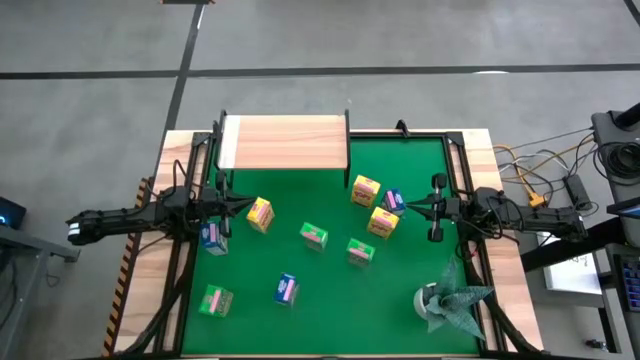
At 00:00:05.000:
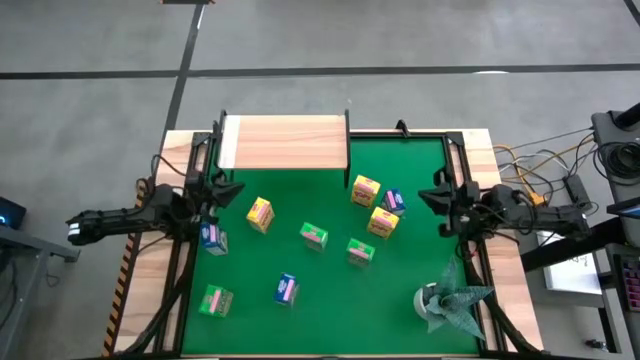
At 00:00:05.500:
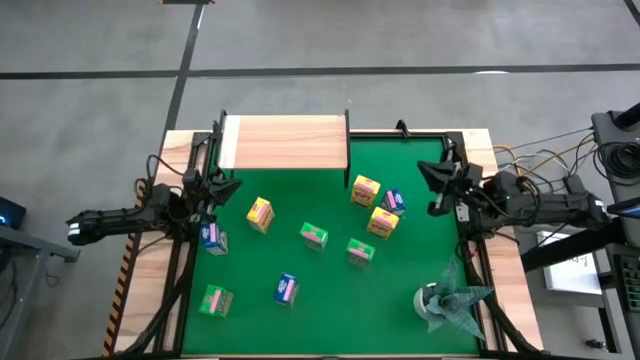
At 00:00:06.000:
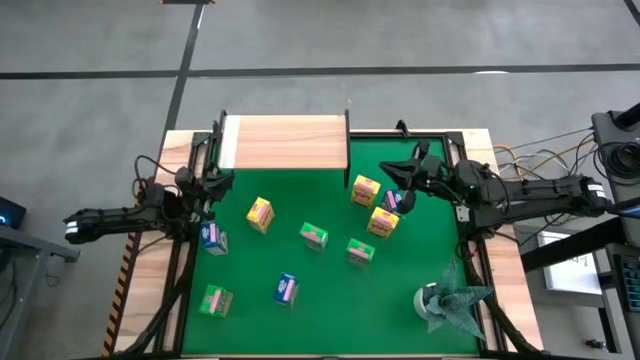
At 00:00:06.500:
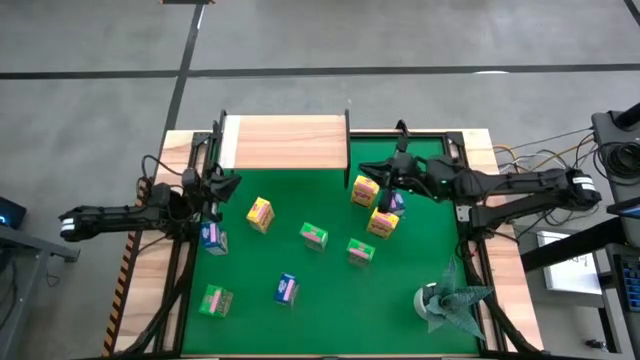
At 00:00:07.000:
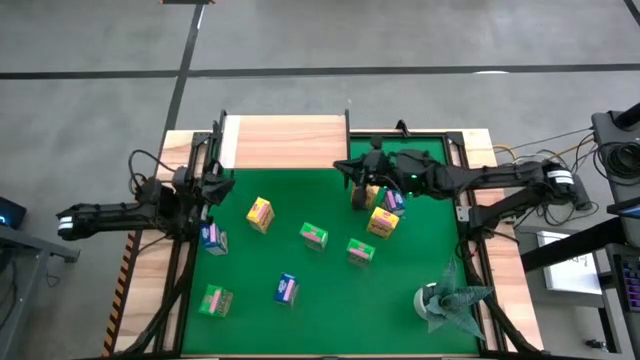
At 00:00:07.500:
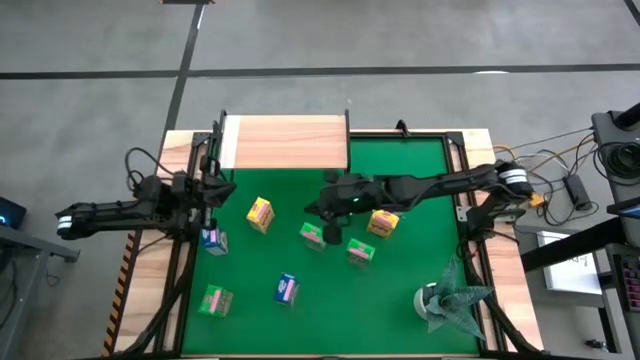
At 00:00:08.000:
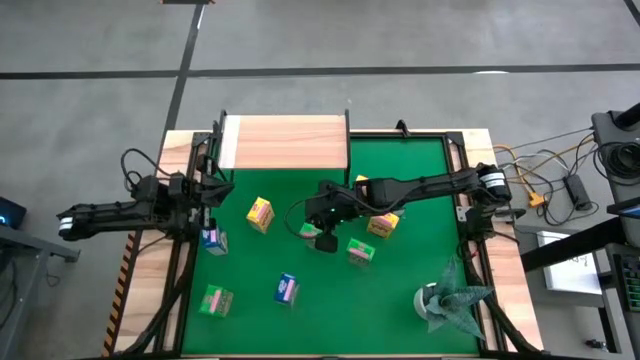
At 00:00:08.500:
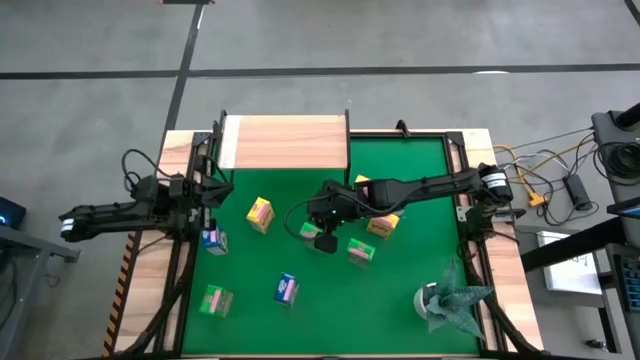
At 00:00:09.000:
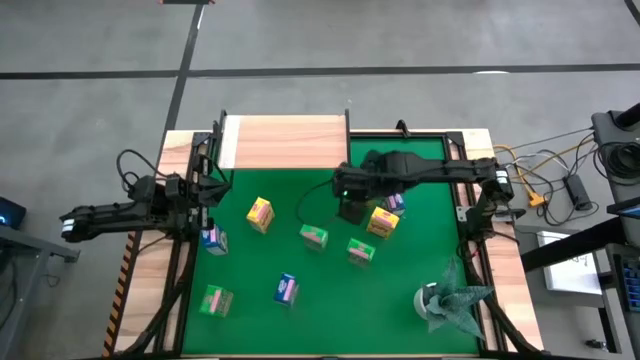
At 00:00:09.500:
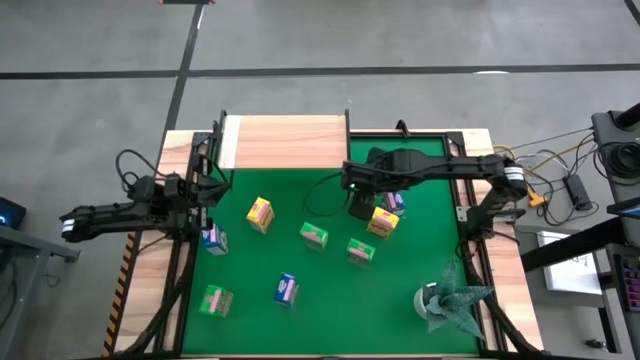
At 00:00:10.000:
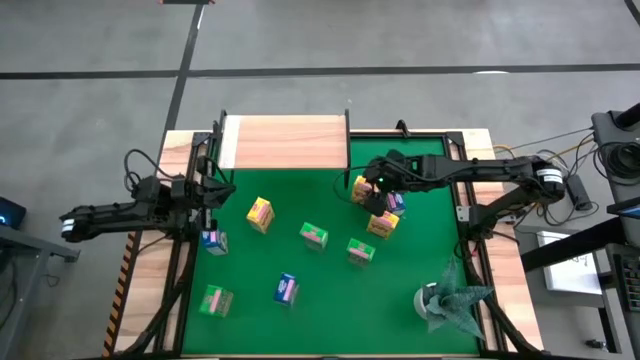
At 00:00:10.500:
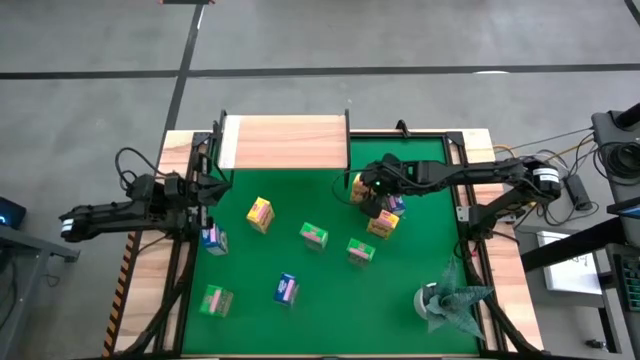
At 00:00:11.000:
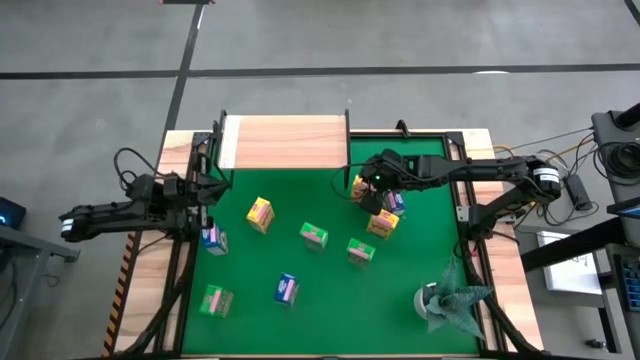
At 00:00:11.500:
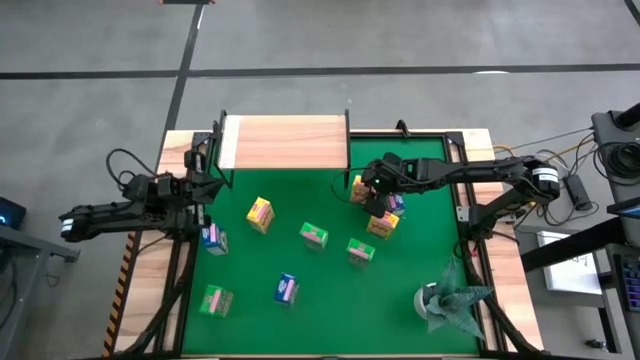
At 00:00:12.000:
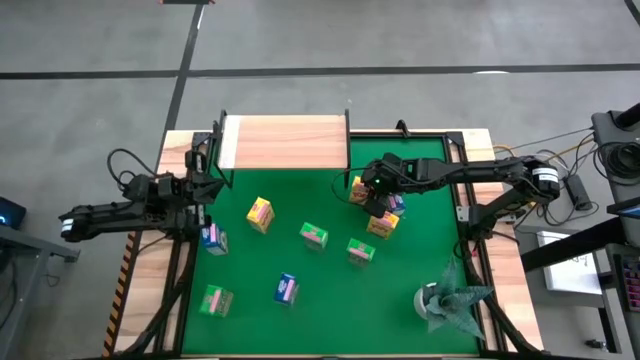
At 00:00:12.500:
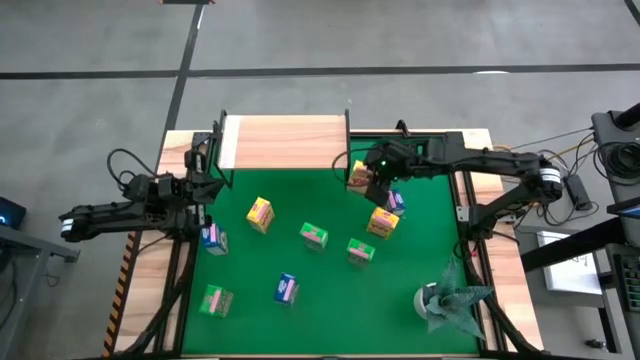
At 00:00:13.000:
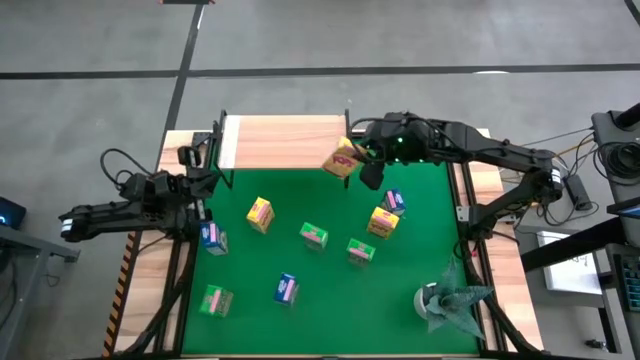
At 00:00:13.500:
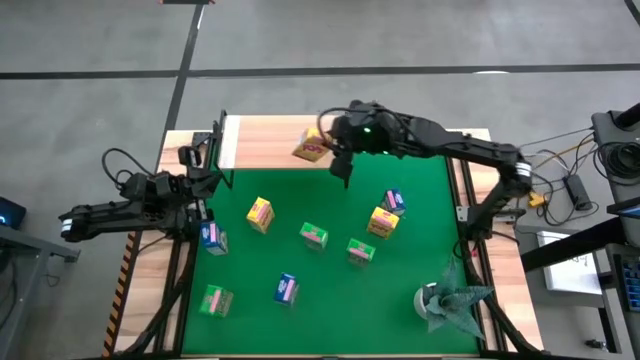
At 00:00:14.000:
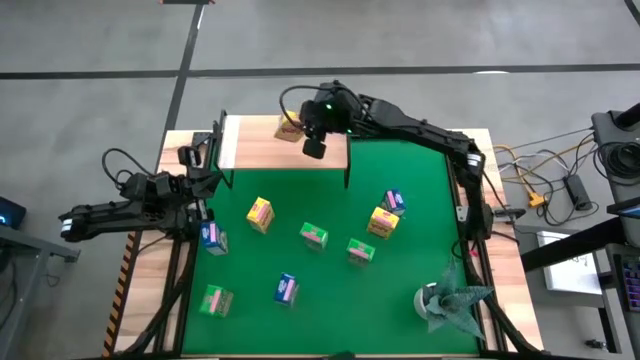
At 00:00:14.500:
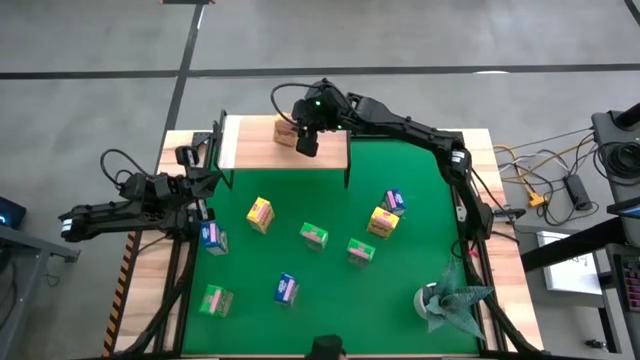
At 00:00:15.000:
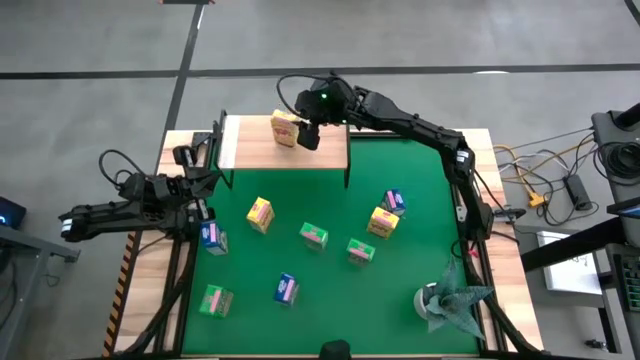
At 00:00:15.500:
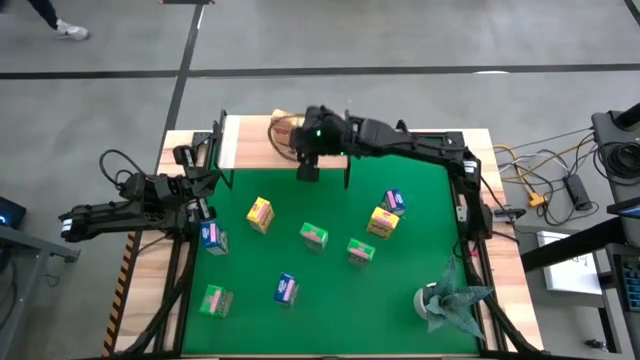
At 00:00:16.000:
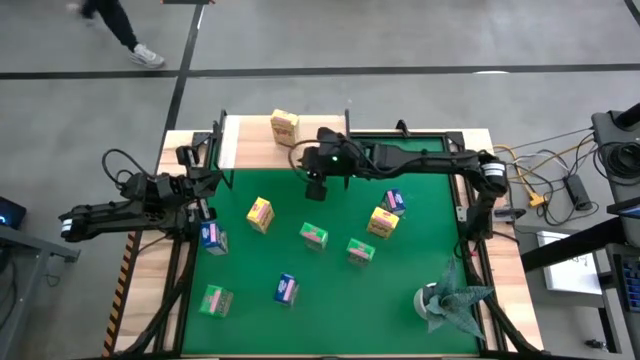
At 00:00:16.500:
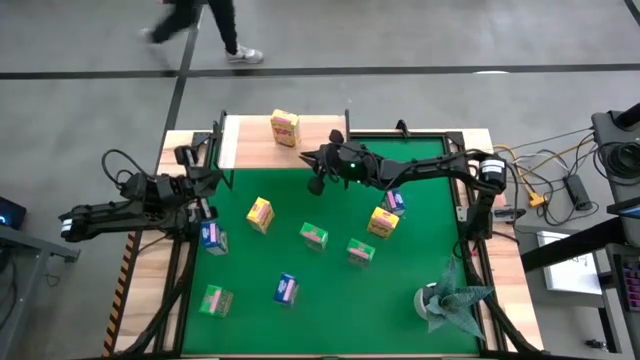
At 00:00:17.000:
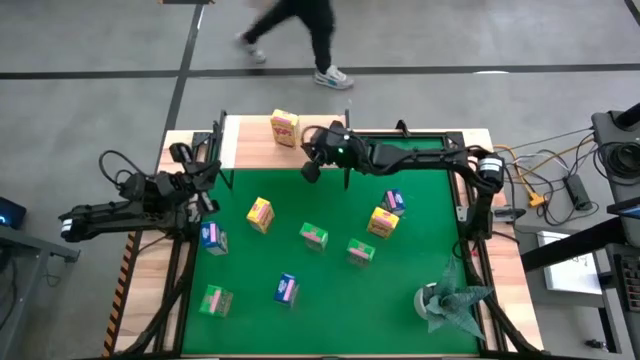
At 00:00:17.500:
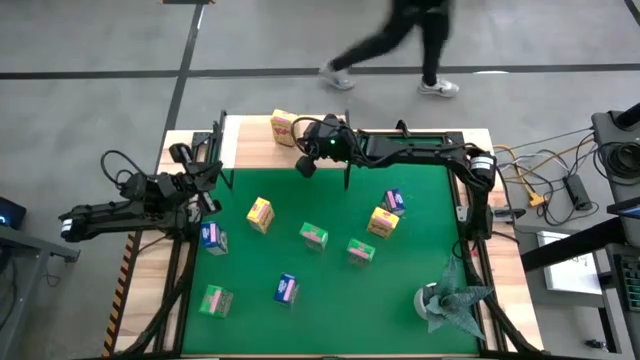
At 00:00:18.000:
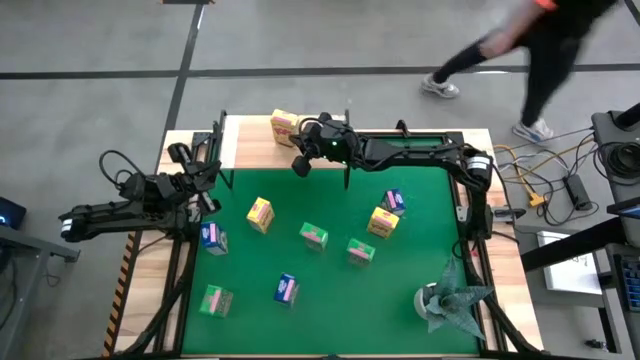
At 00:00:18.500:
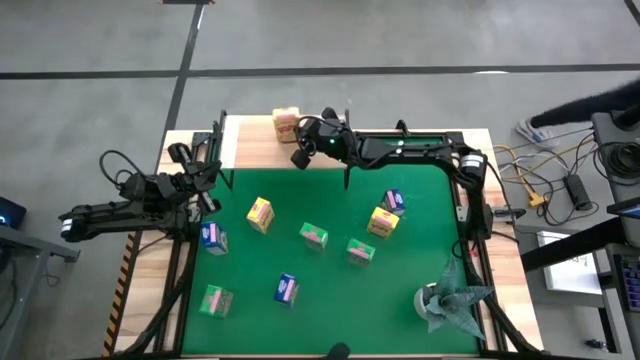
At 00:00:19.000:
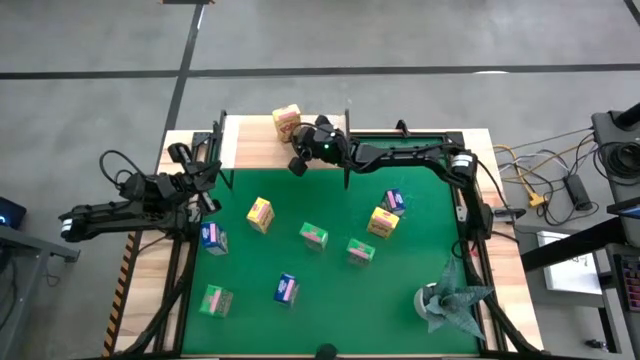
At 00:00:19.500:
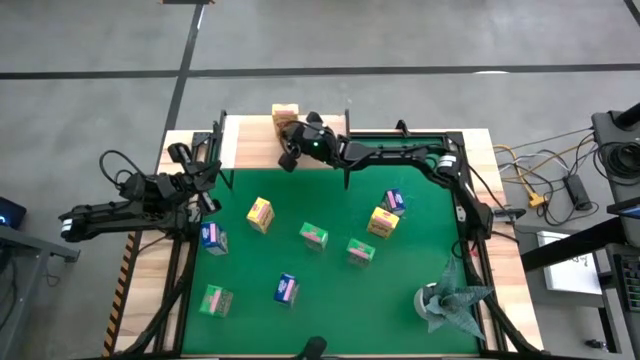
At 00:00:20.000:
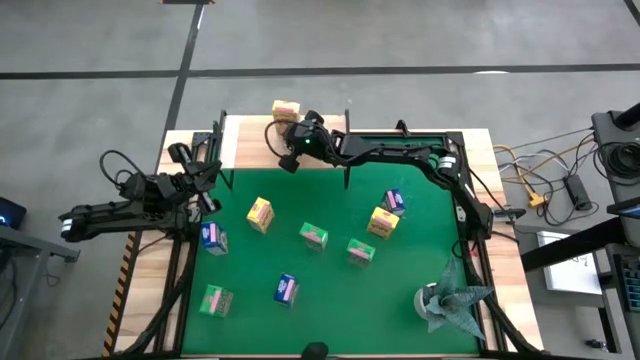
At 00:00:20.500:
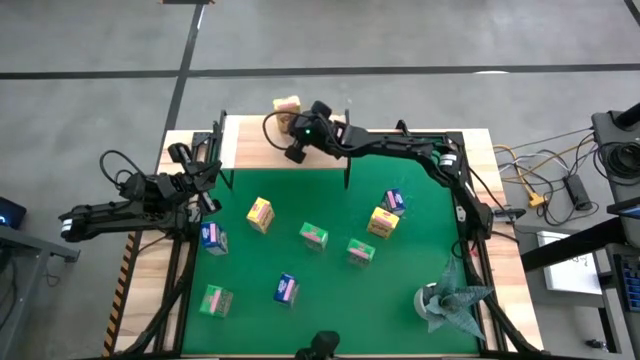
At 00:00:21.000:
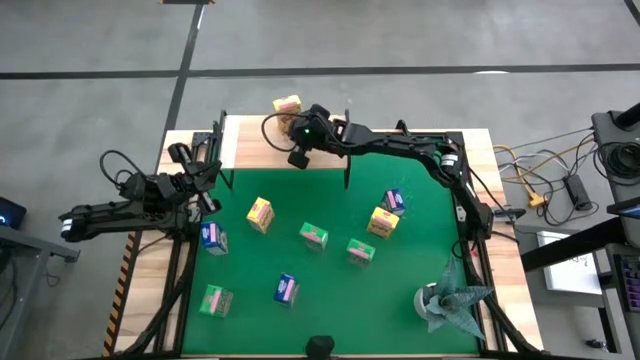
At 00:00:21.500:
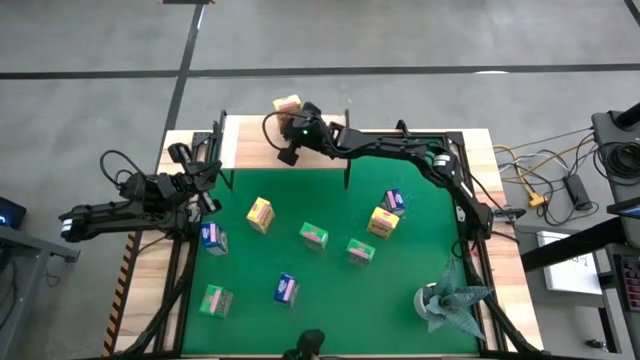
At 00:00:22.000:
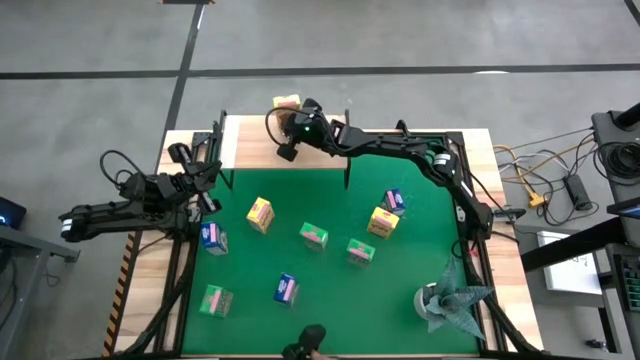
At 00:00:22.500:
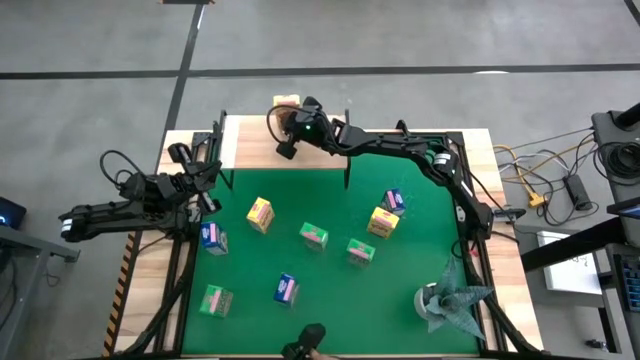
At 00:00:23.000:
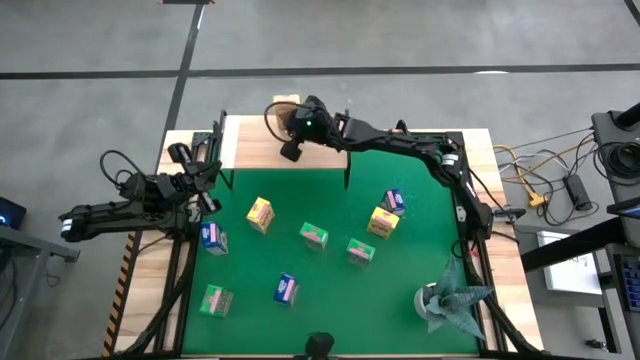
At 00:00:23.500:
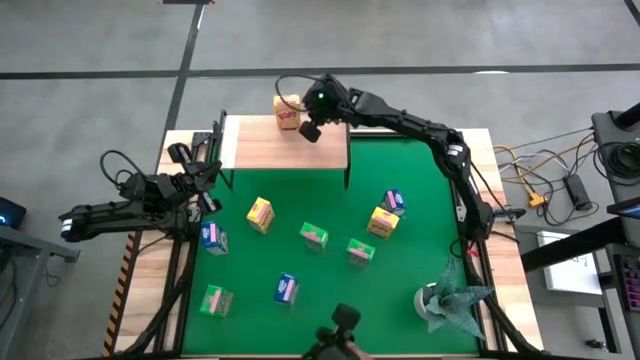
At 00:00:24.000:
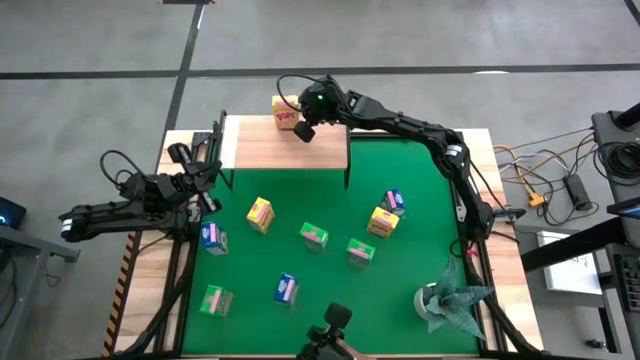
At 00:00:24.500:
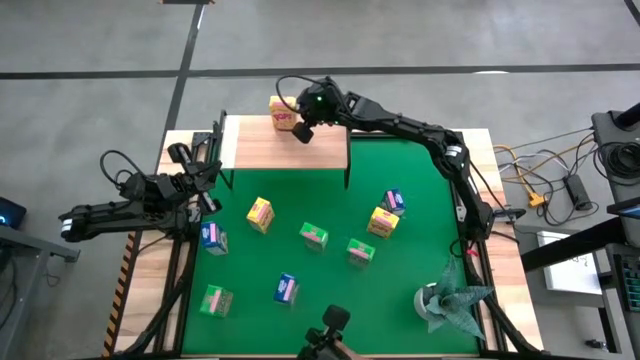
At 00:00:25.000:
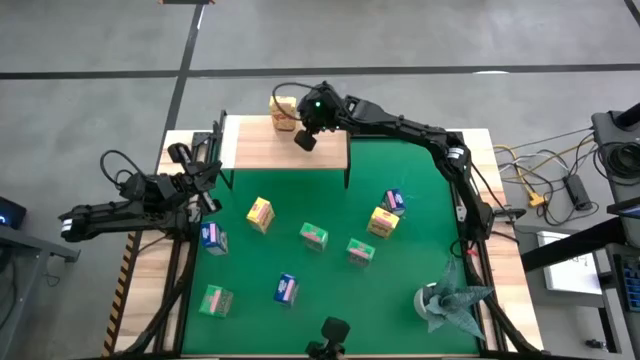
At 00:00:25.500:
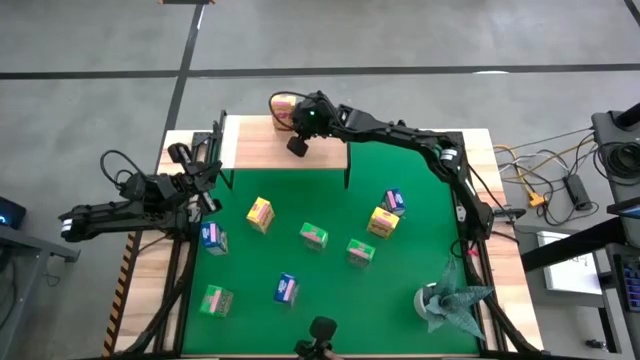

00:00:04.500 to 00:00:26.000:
Task: Stack cereal on shelf
Put the top yellow cereal box on the shelf
